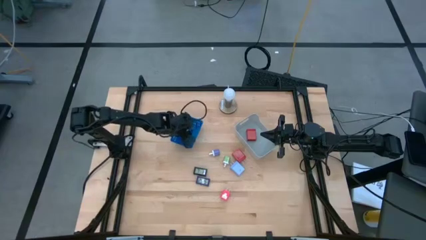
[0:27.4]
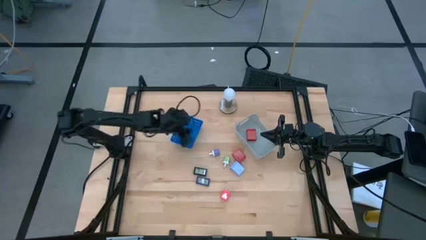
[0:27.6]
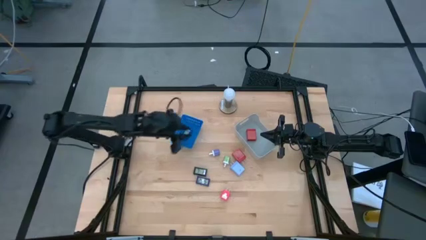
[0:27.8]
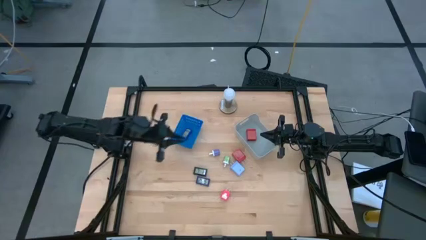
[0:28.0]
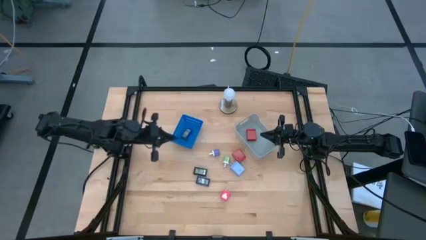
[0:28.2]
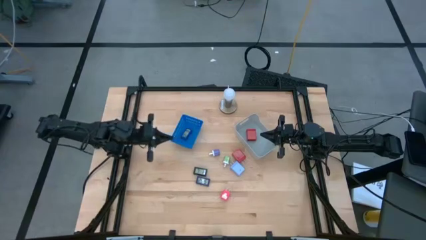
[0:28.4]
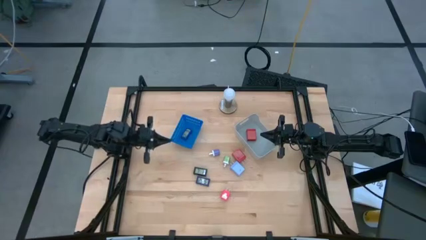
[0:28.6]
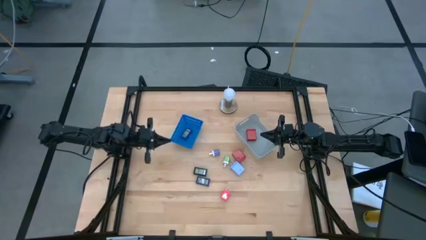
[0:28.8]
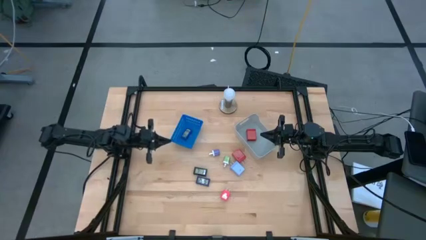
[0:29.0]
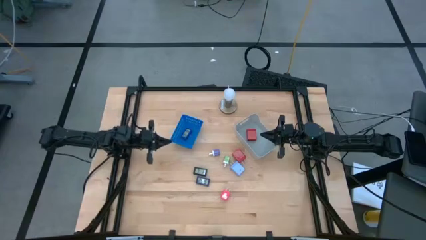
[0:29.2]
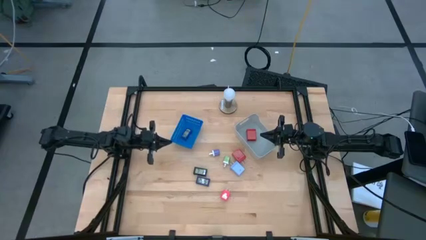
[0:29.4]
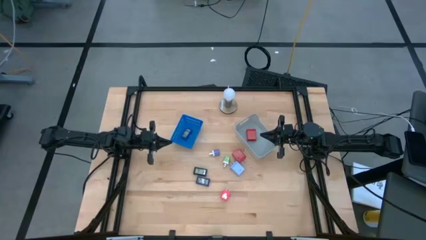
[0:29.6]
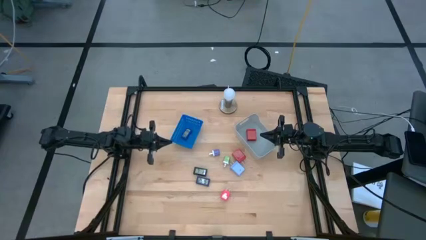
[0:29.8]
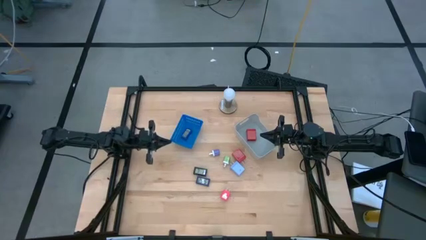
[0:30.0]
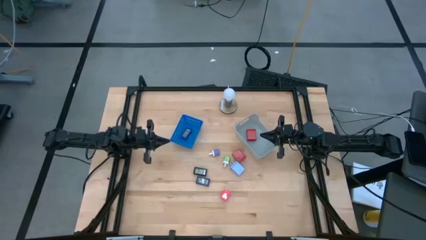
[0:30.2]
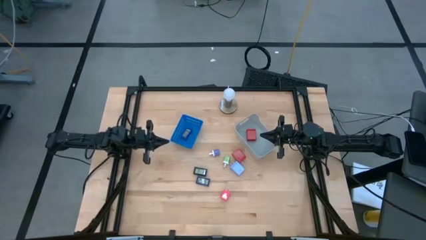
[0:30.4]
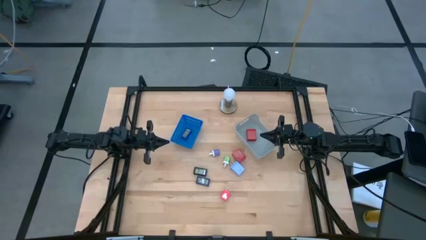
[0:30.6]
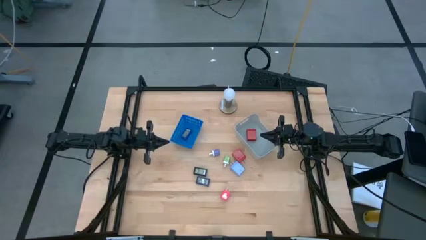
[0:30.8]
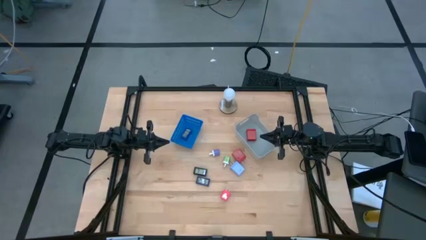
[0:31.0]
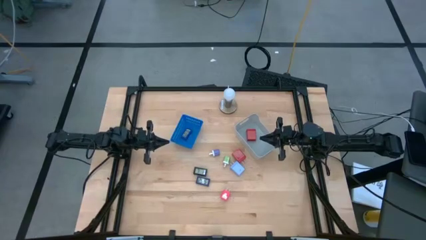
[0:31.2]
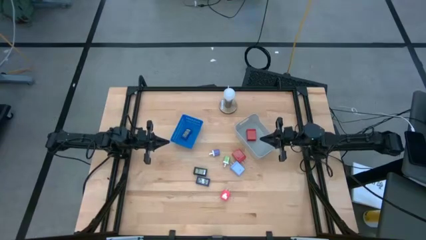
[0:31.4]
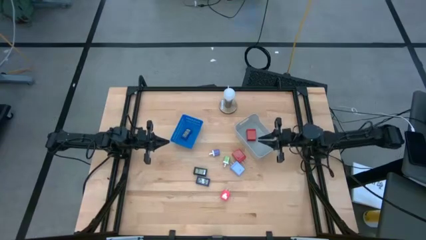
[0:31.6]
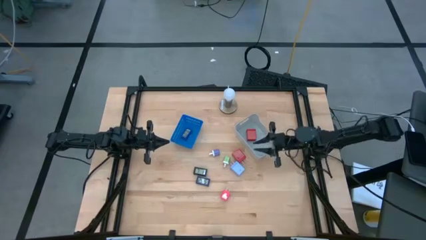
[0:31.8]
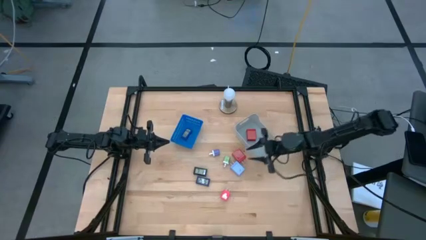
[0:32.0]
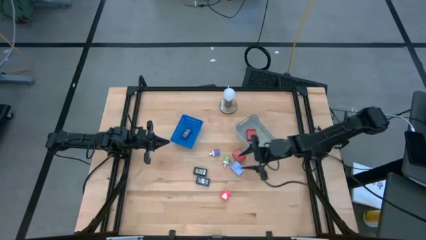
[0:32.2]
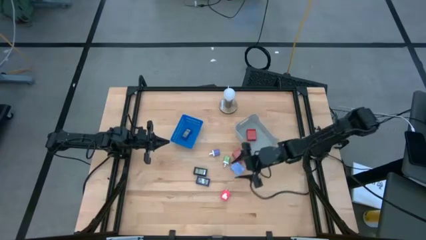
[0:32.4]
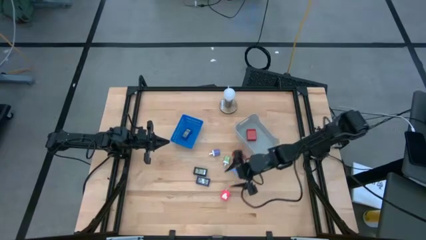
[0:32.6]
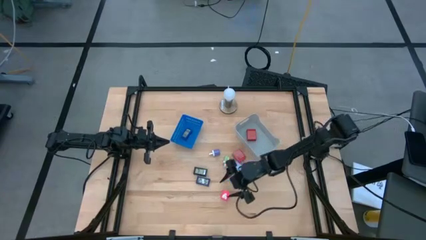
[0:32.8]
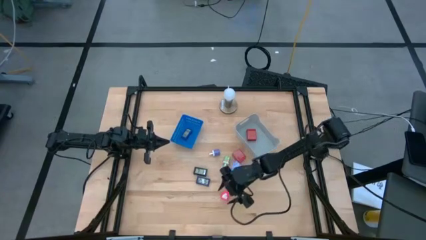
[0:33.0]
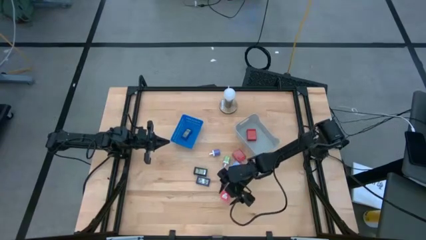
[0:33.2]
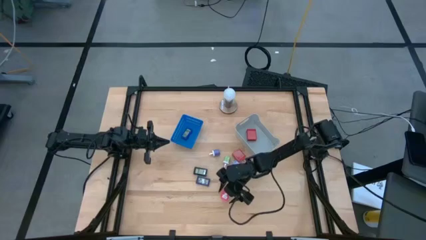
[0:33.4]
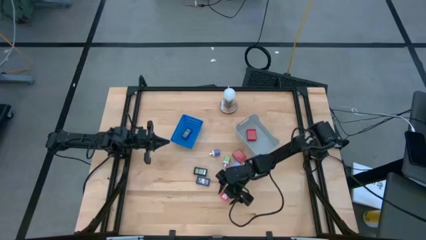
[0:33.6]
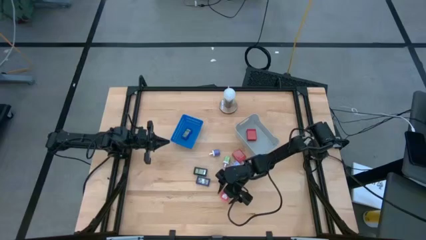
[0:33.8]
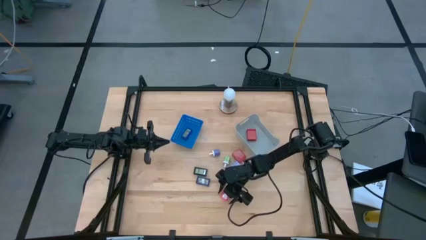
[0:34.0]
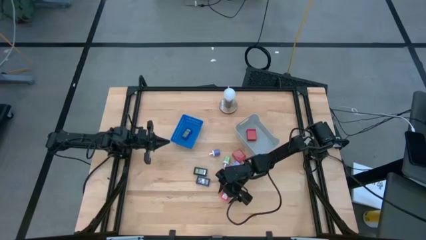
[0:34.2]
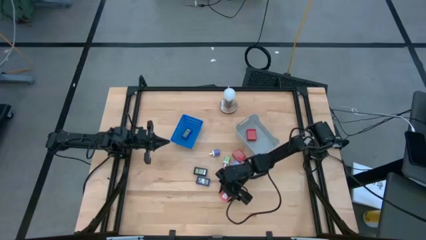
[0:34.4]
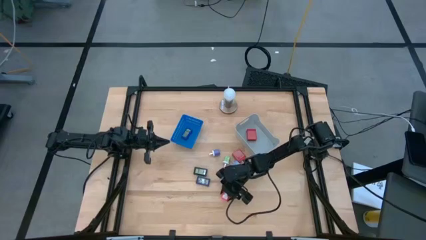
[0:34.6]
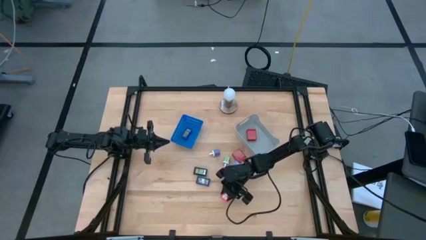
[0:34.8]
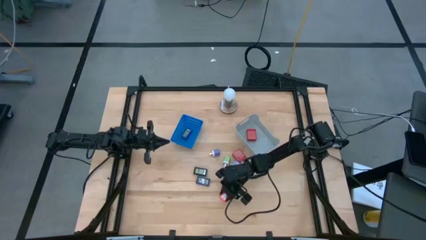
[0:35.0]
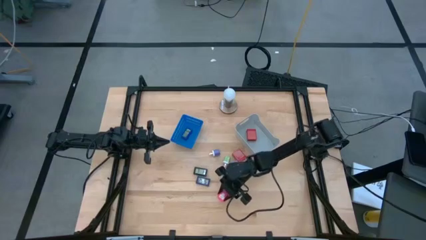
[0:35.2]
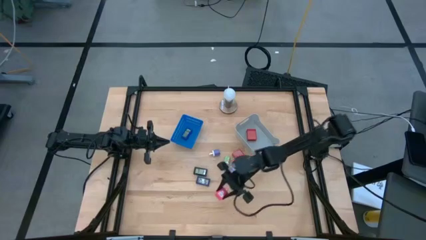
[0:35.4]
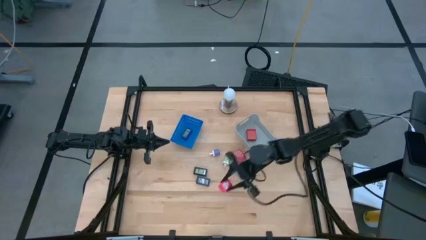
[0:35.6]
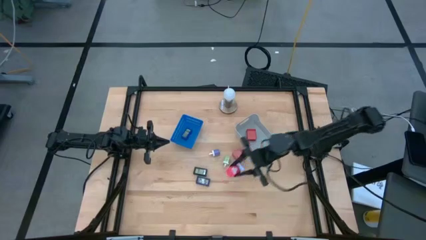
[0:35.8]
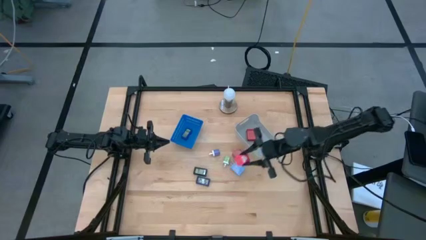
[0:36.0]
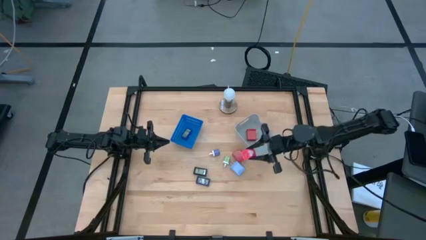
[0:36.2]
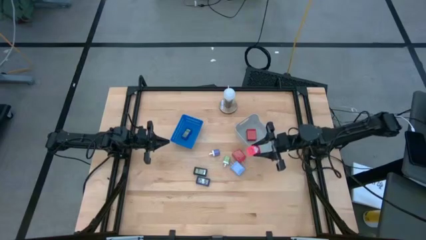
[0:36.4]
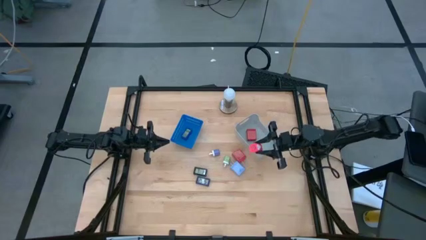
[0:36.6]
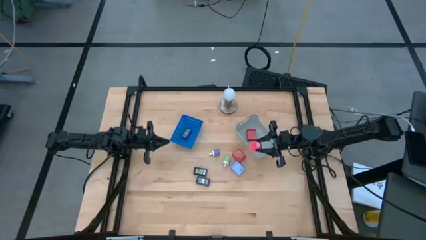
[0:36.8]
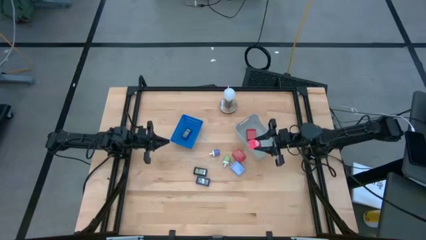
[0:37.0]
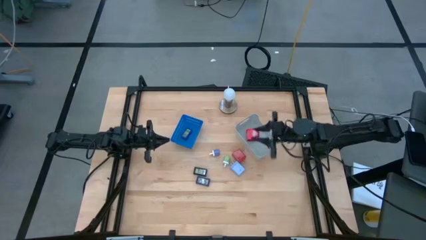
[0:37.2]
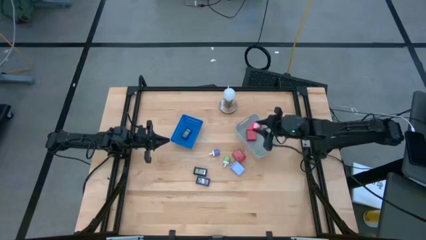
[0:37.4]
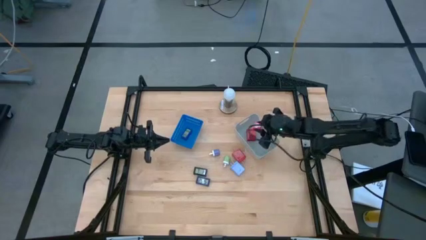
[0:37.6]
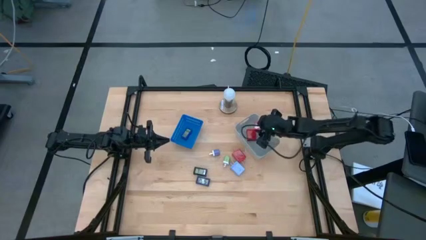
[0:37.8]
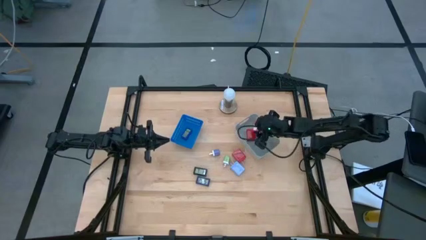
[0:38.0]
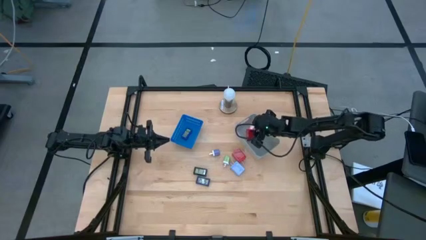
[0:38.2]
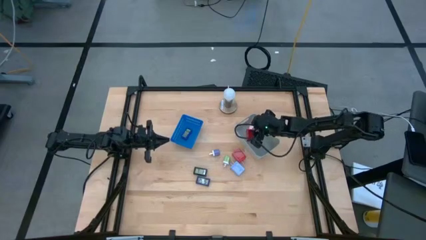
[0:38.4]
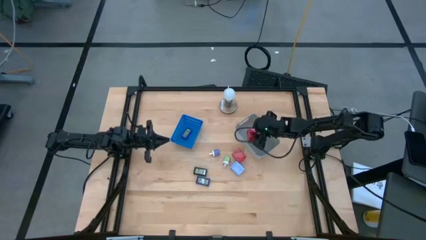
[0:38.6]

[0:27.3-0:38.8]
Task: Pick & Place Office items
Put the pink charger into the gray bin

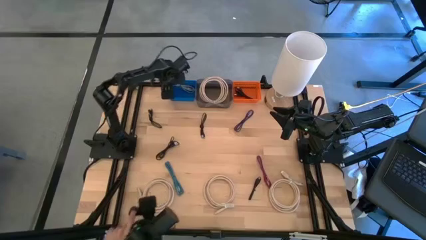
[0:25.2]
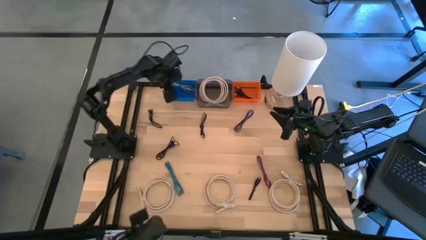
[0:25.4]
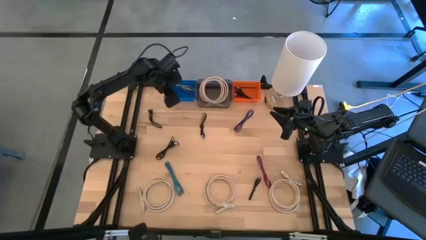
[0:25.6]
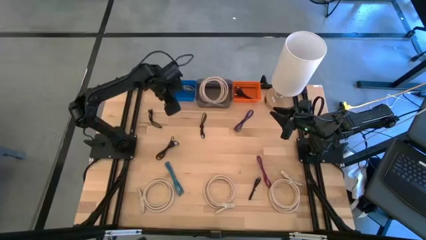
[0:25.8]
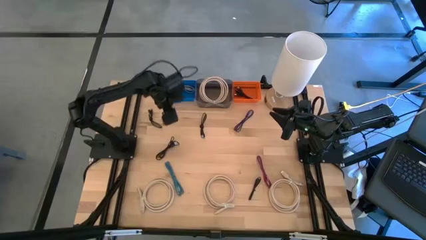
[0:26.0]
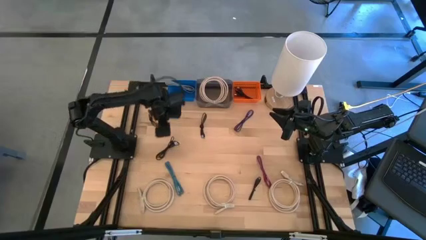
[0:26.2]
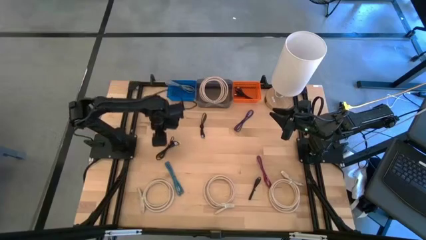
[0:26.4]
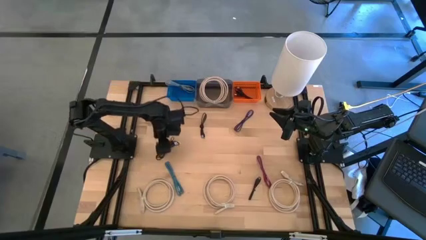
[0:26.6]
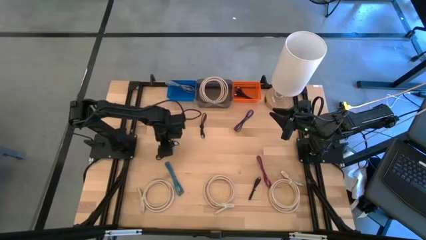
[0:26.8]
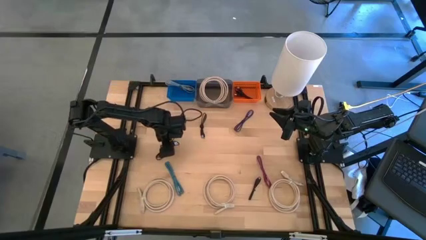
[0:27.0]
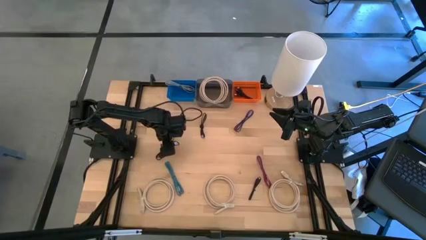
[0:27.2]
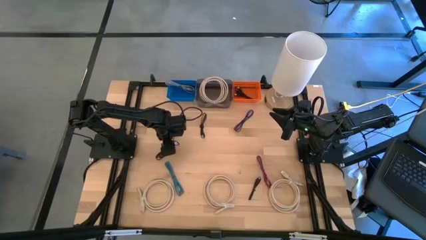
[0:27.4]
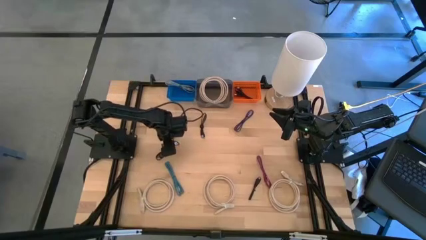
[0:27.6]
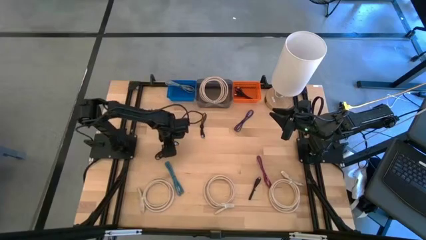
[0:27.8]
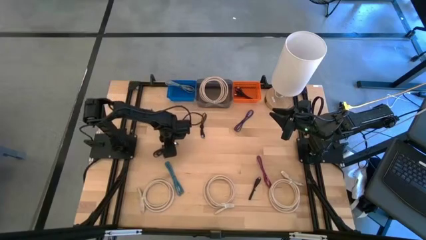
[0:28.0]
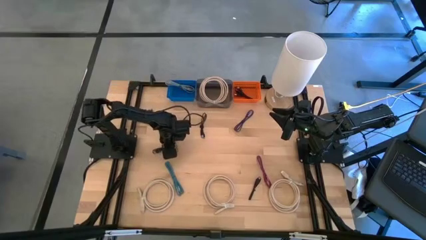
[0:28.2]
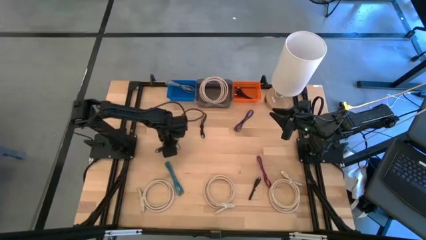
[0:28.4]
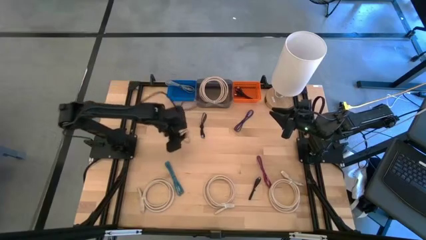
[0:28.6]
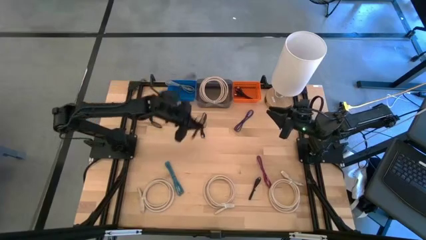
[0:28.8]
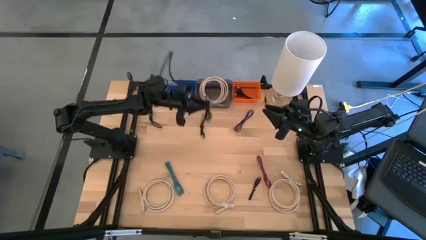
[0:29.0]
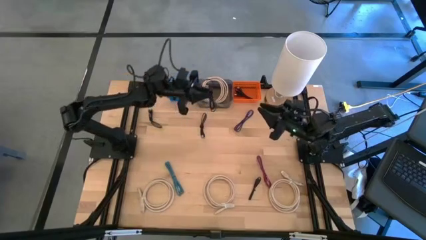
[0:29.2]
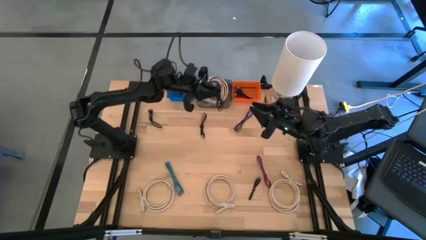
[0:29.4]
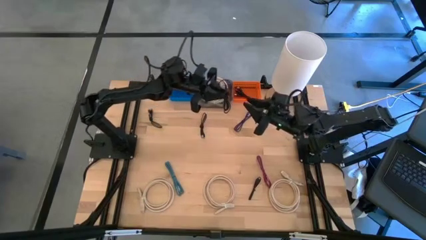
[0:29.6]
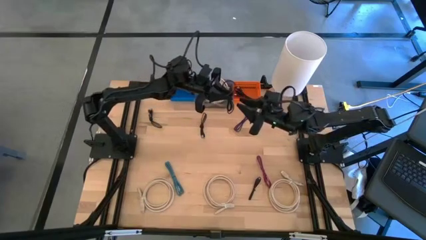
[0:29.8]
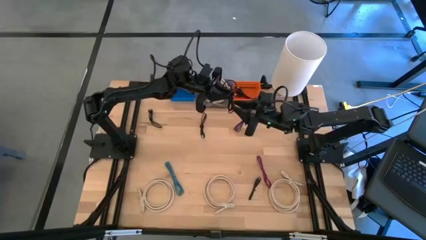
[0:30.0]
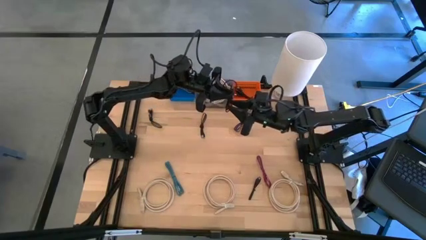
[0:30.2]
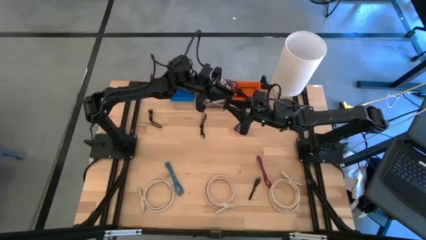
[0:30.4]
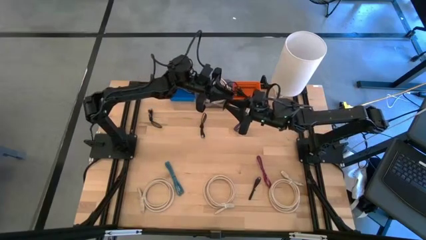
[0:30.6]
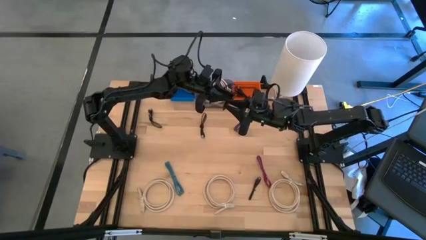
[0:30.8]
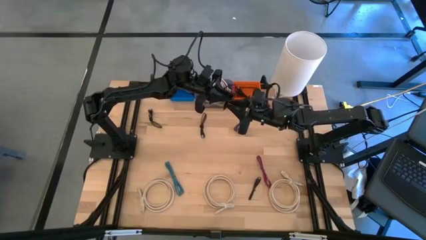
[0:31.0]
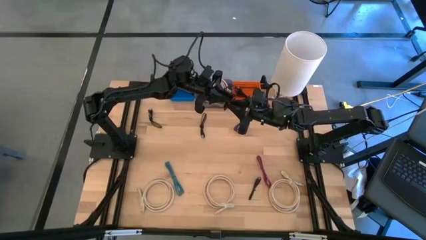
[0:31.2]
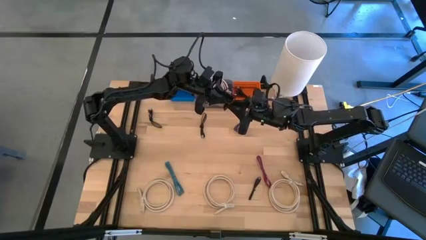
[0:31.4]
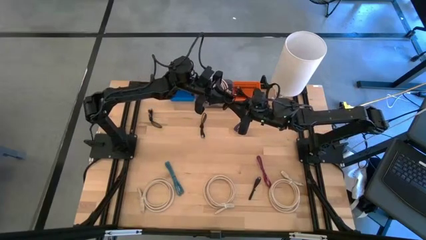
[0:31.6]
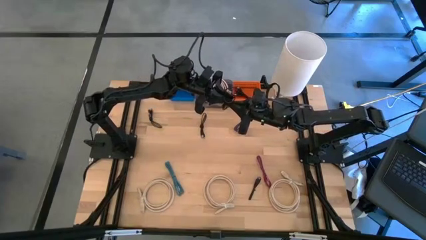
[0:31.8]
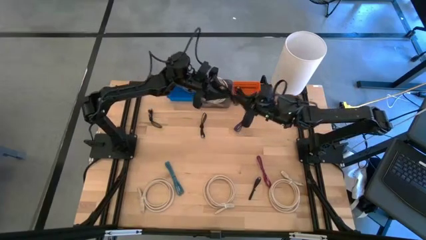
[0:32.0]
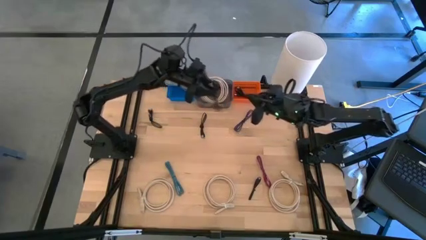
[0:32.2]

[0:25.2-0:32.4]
Task: Pick & Place USB Port
Put the black charger cable into the orange bin
